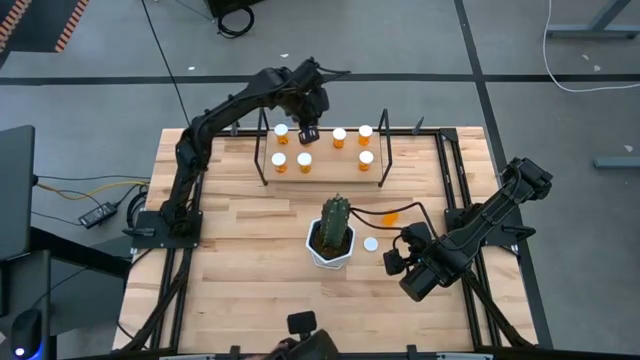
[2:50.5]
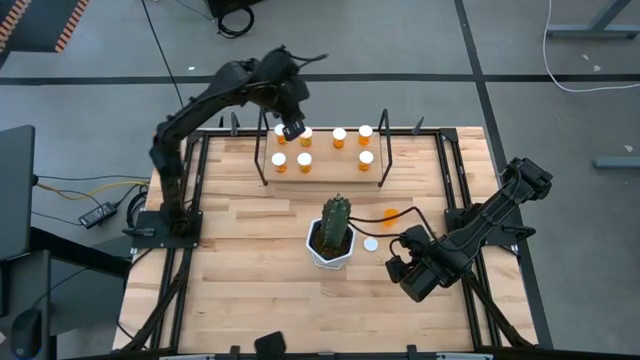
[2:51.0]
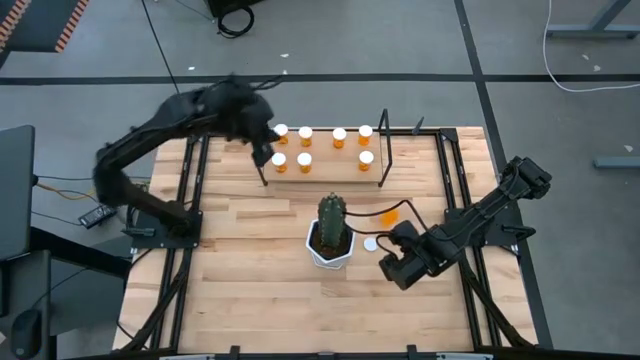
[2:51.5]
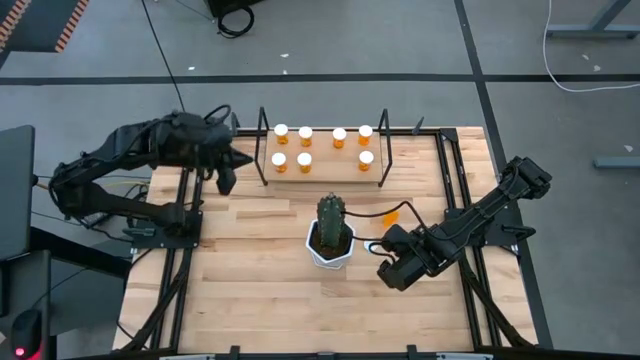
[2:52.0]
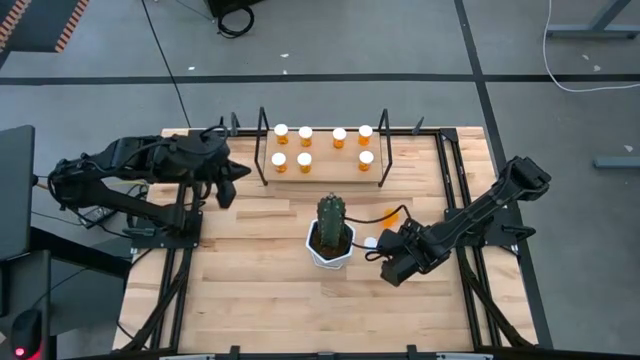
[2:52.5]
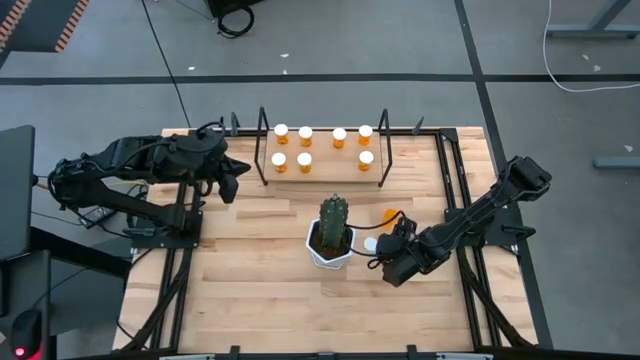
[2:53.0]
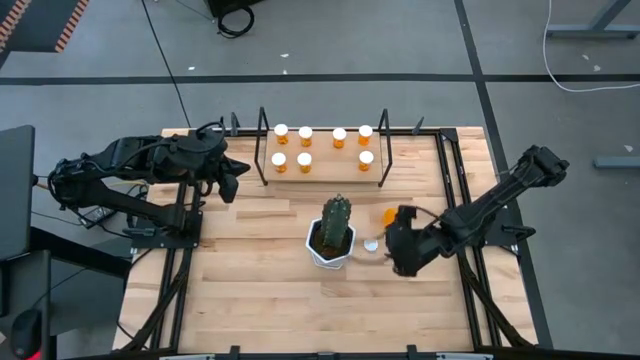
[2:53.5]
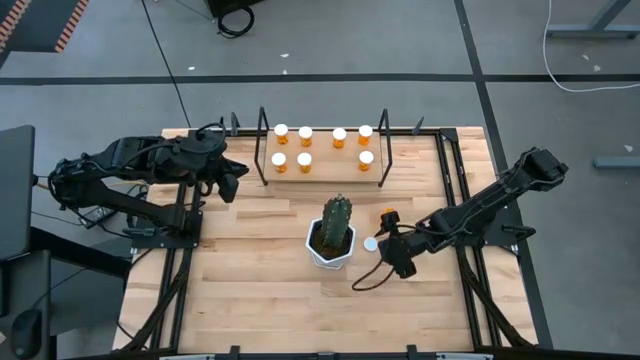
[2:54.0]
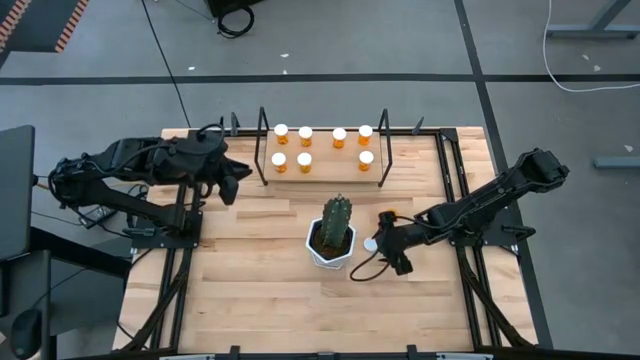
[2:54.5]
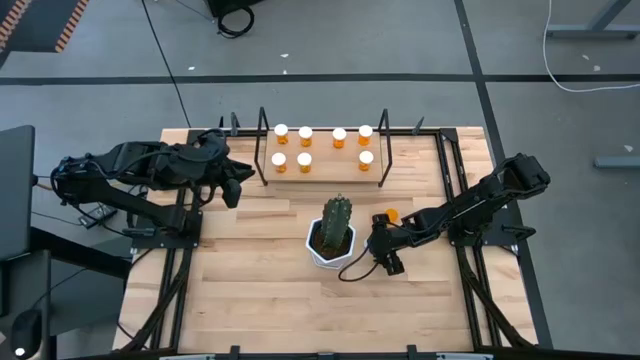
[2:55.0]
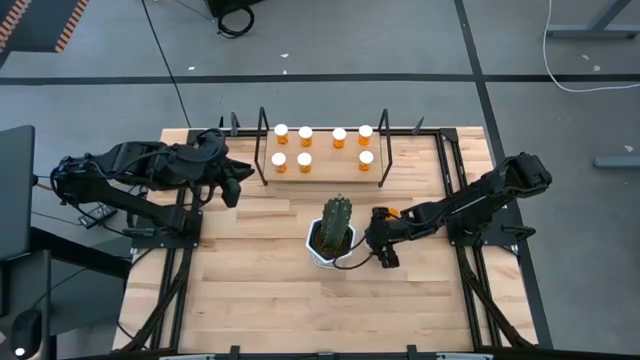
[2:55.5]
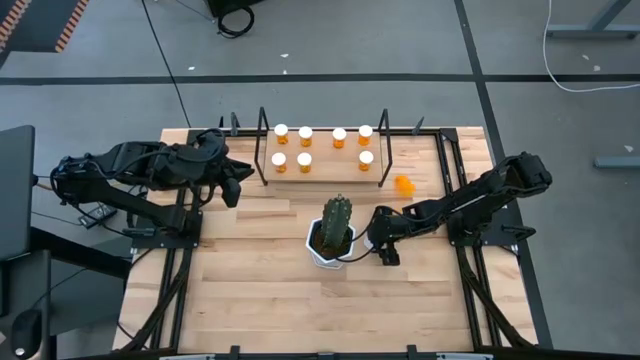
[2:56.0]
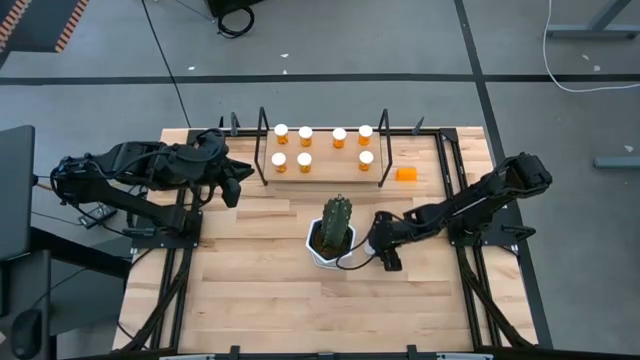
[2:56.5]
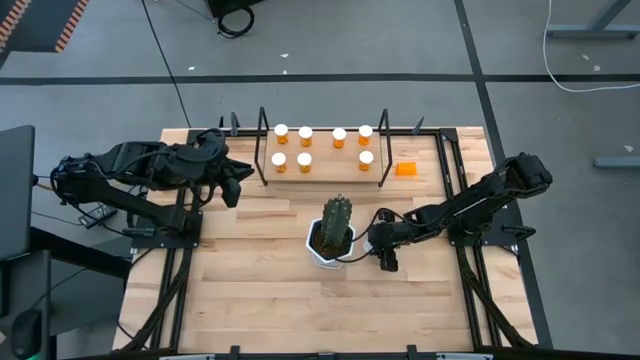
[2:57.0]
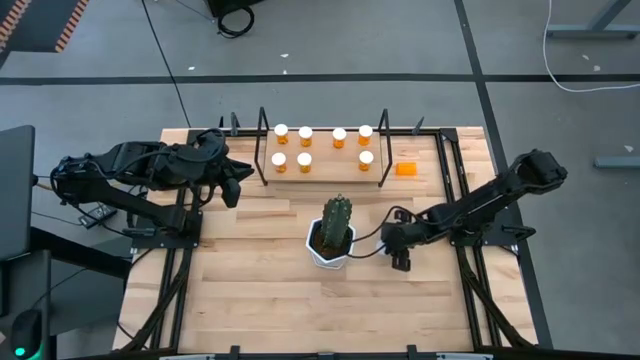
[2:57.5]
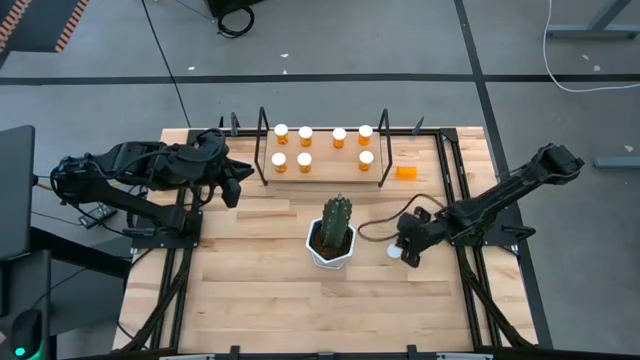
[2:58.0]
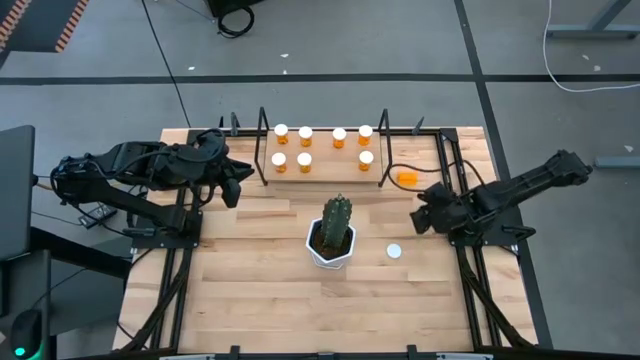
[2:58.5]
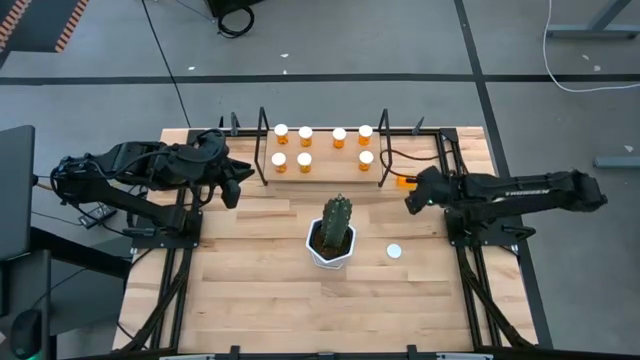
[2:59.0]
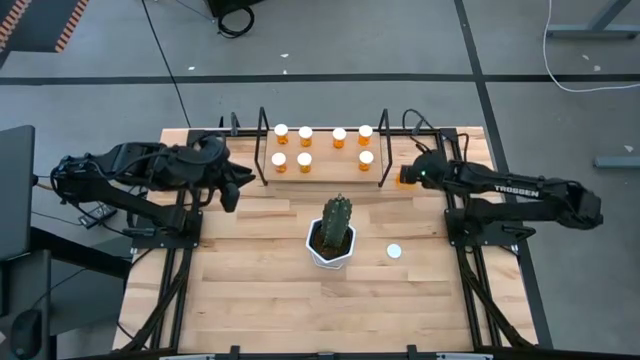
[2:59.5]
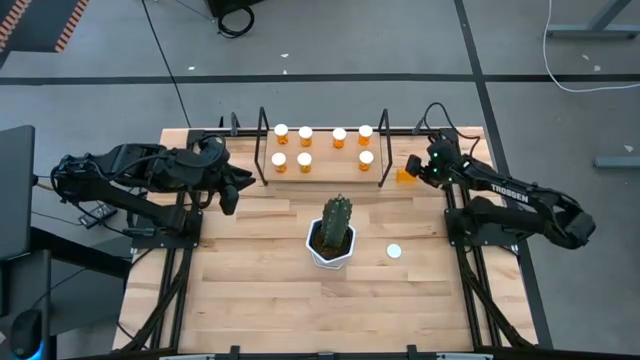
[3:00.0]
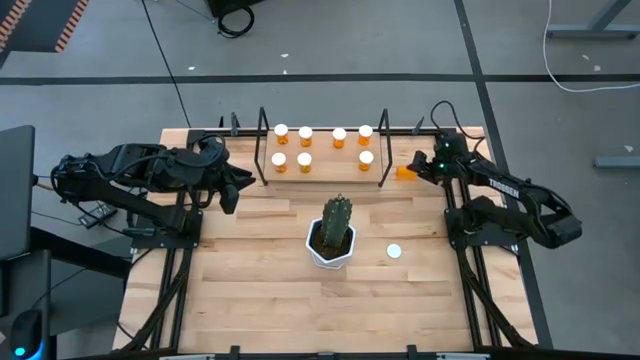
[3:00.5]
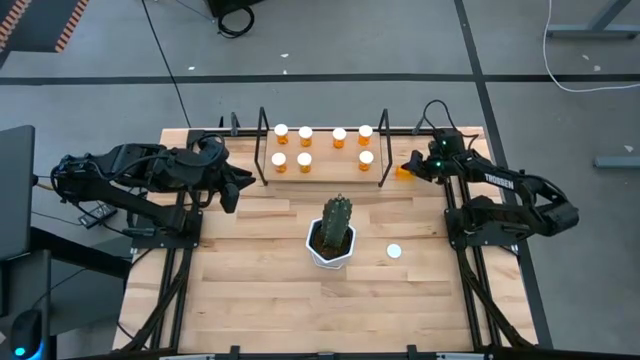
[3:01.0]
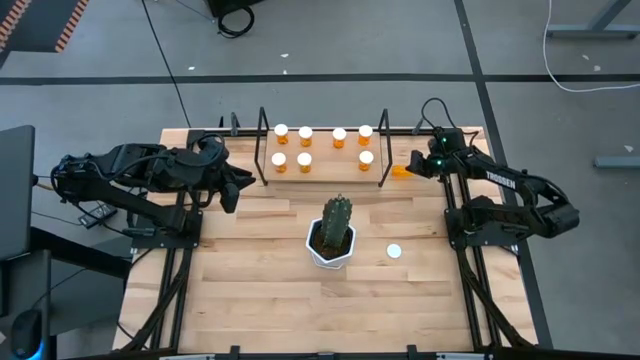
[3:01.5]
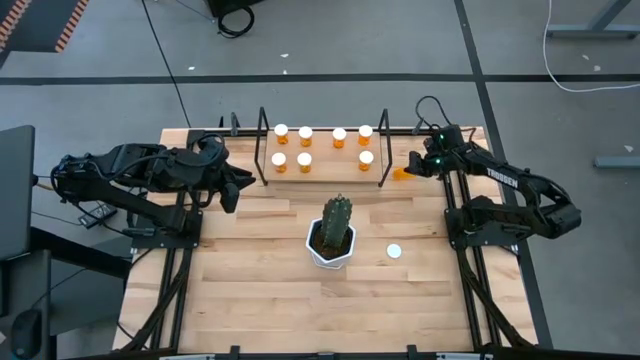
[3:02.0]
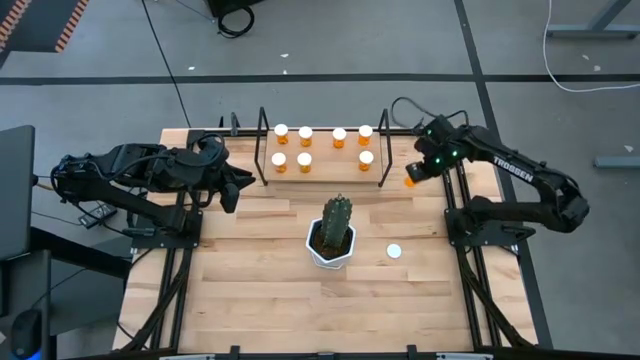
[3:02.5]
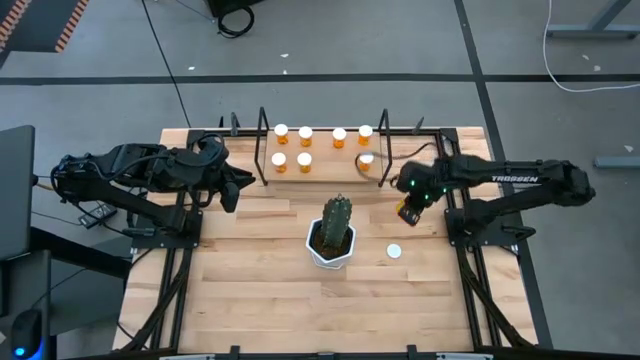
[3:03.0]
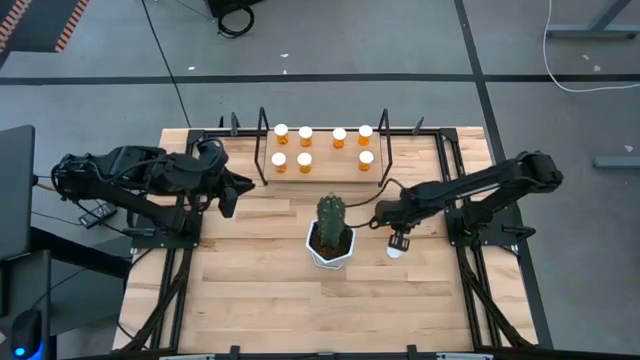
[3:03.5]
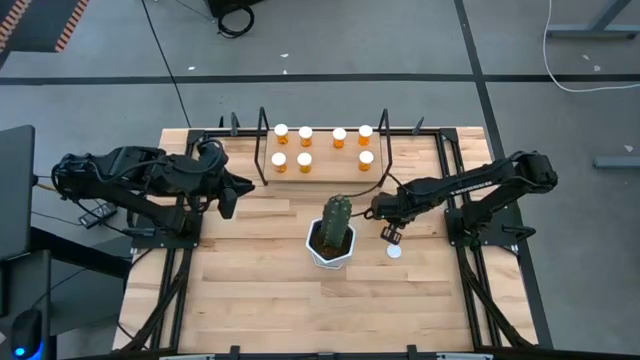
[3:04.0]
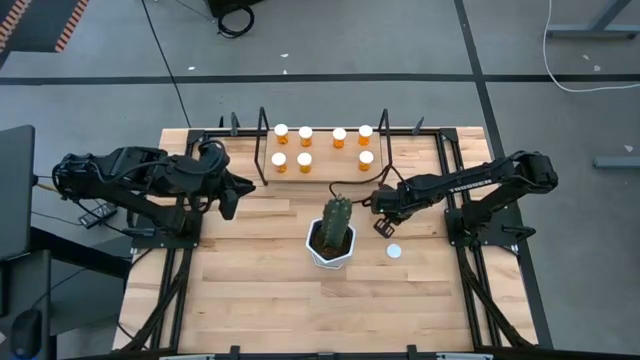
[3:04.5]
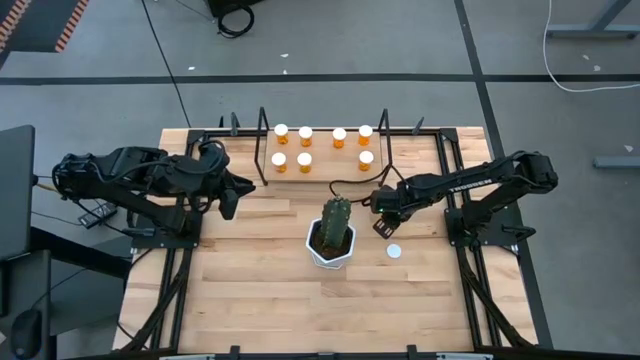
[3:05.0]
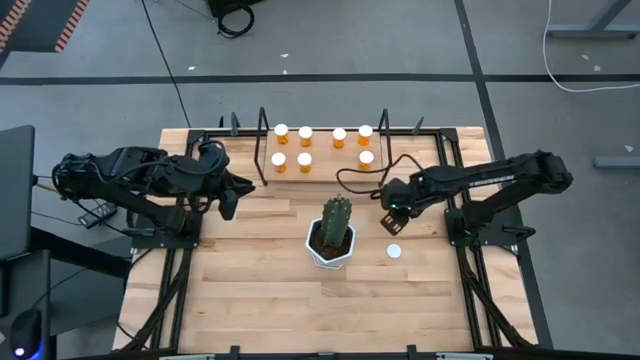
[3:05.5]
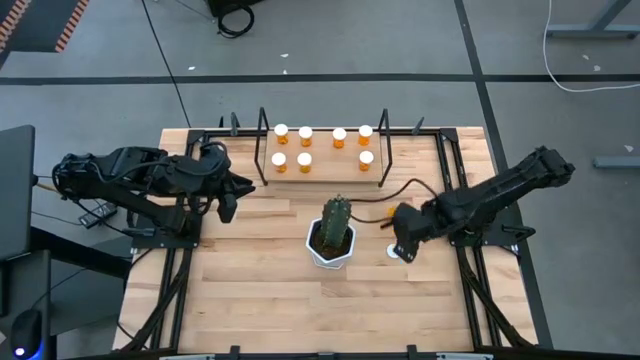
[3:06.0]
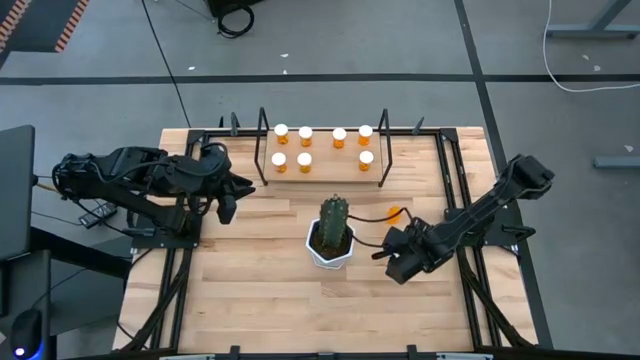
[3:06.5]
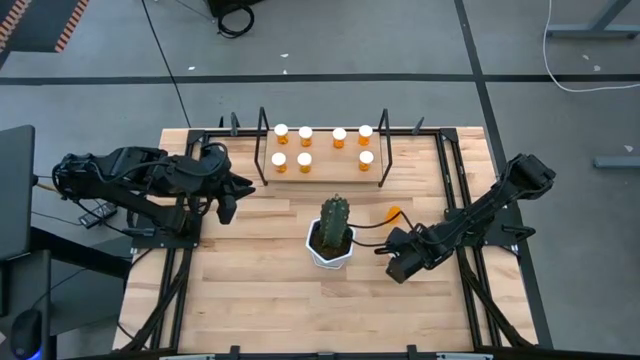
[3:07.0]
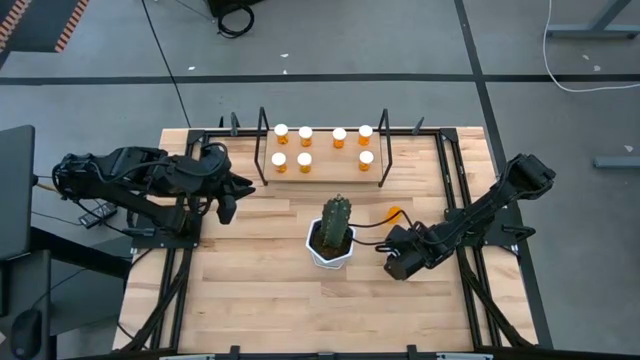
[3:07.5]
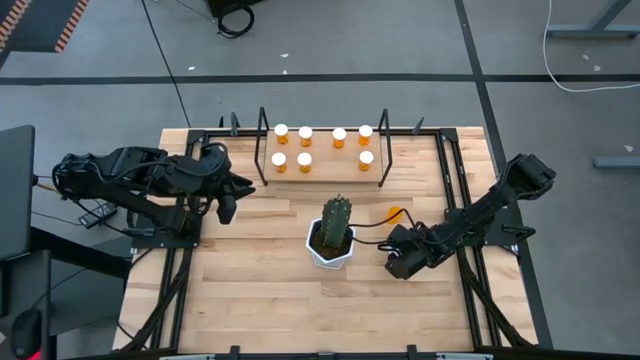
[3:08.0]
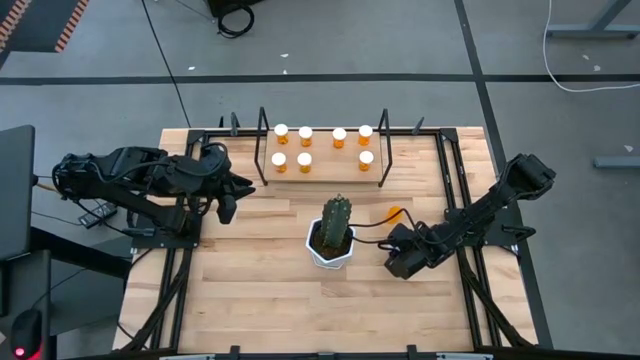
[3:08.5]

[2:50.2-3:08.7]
Task: Pick and place medicine bottles onto shelf by color
Close the orange medicine bottle

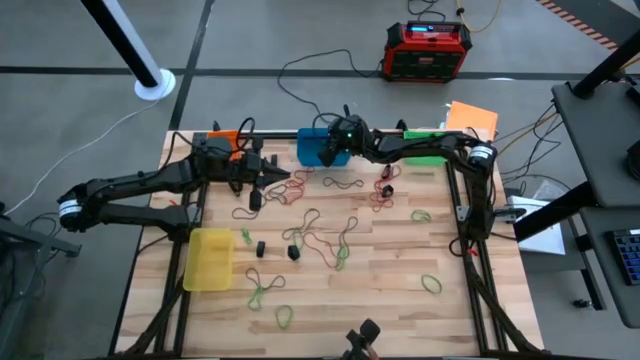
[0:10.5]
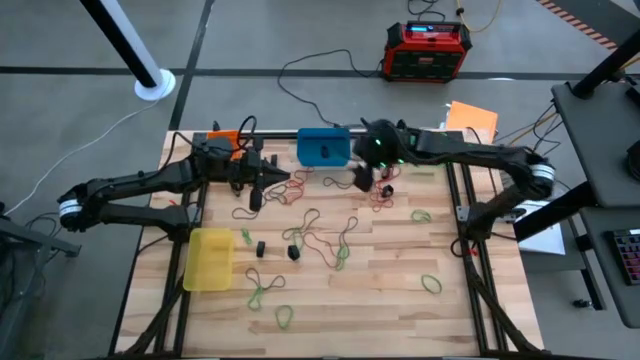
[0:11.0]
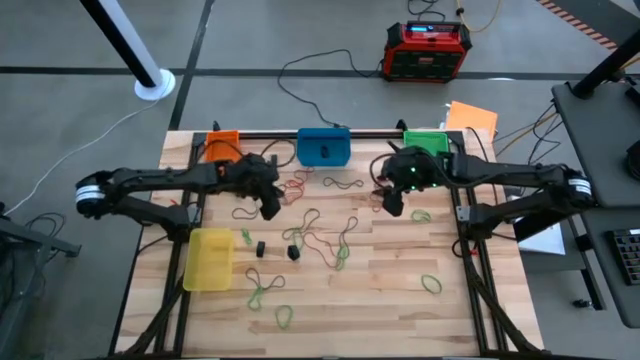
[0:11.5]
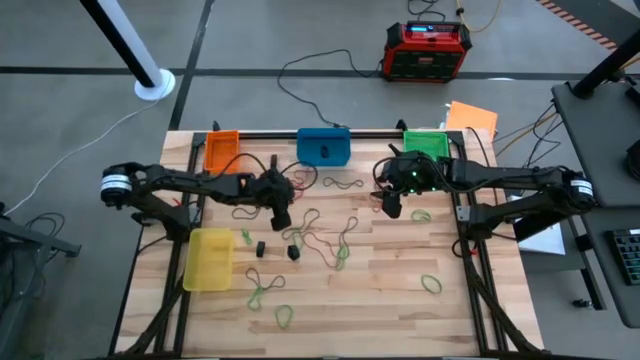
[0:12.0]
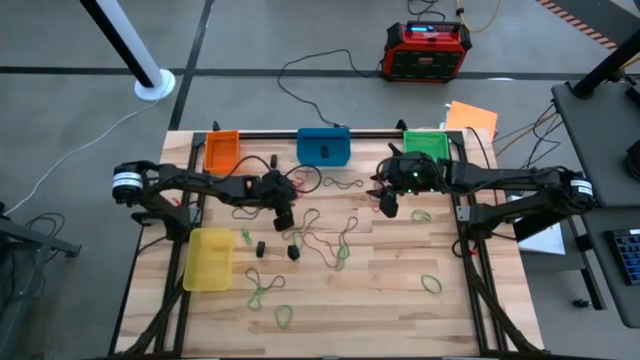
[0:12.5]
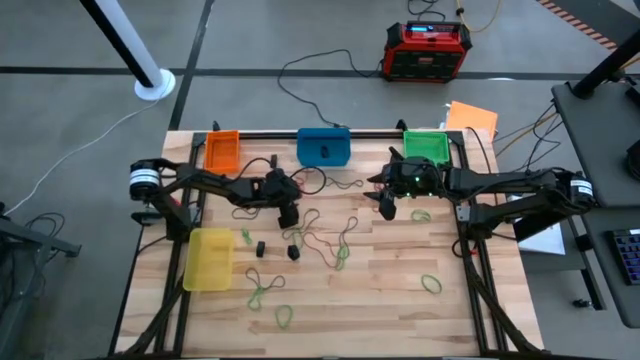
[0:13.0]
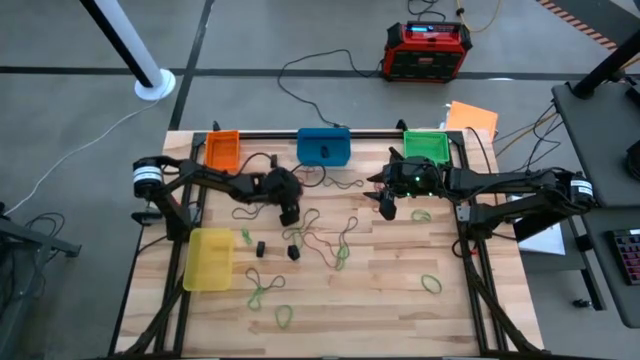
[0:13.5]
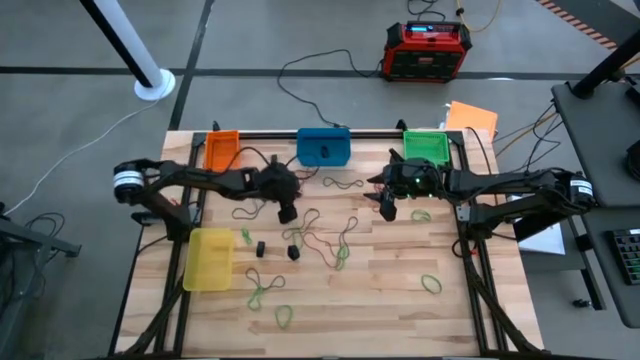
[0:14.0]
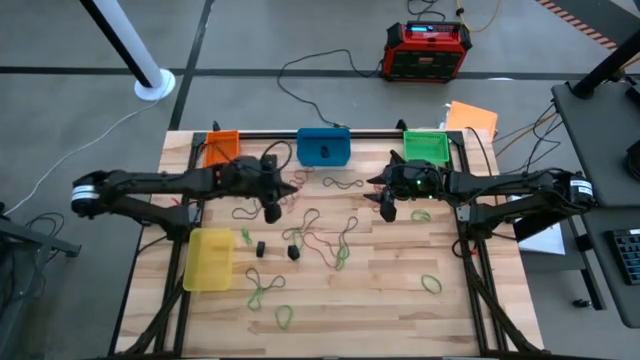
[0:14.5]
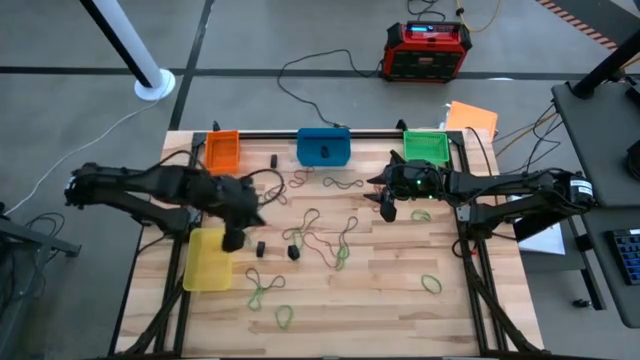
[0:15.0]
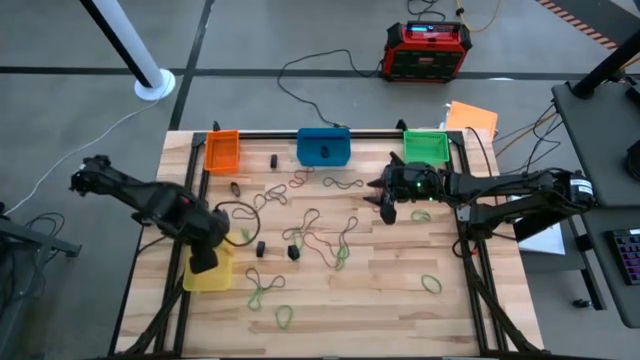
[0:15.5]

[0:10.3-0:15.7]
Task: Sort rubber bands into baskets
Put the red rubber band into the yellow bin
